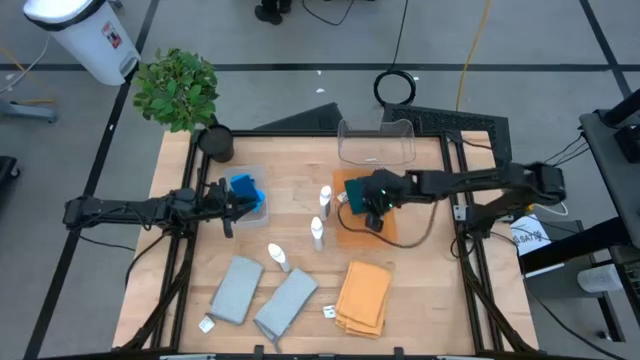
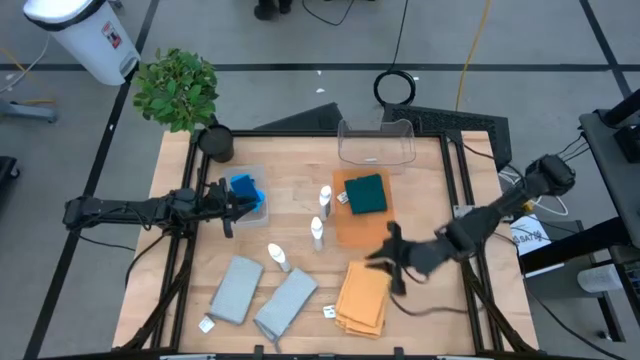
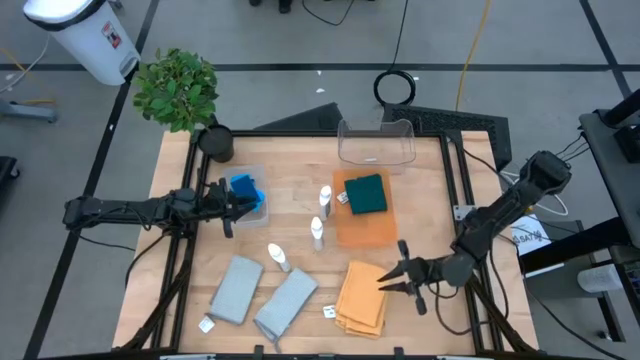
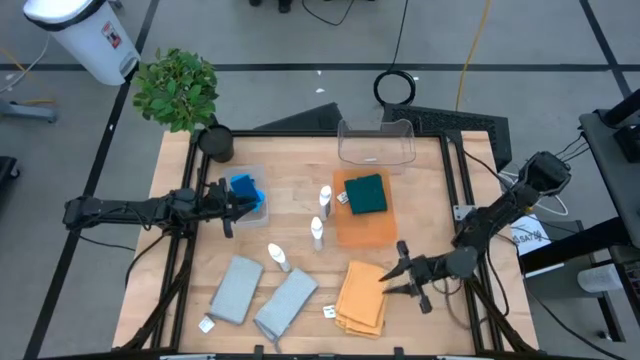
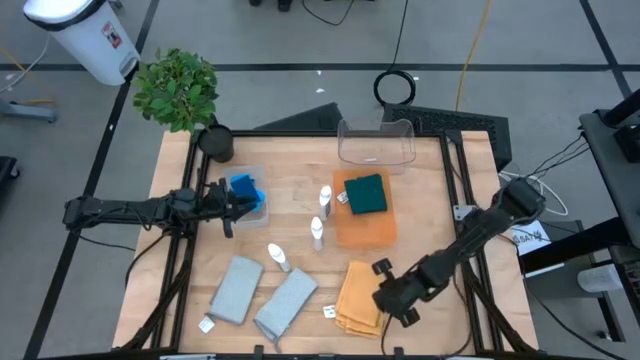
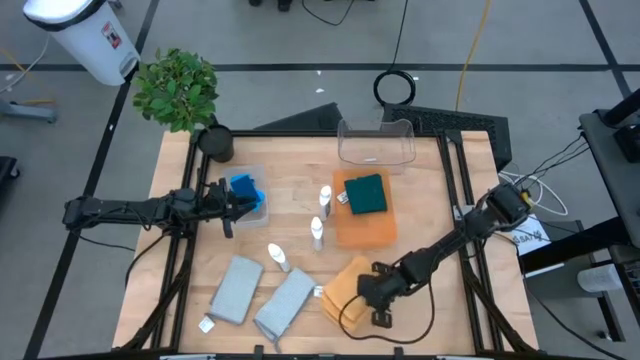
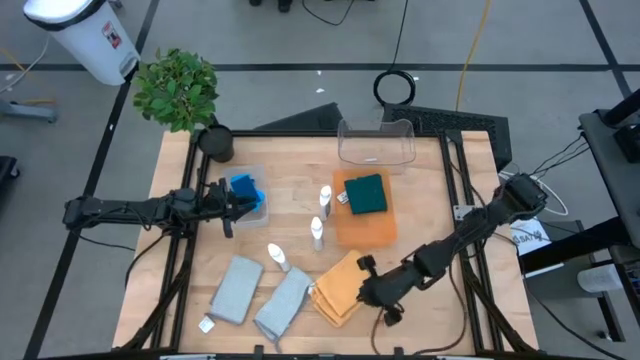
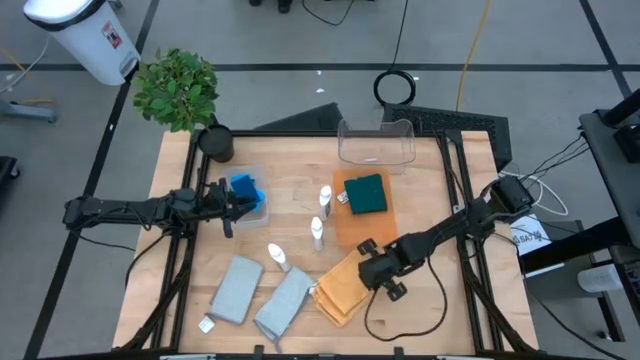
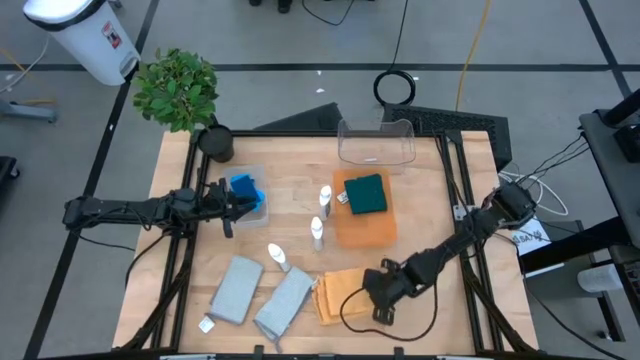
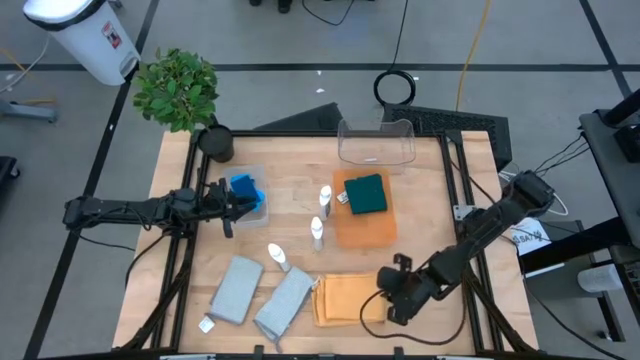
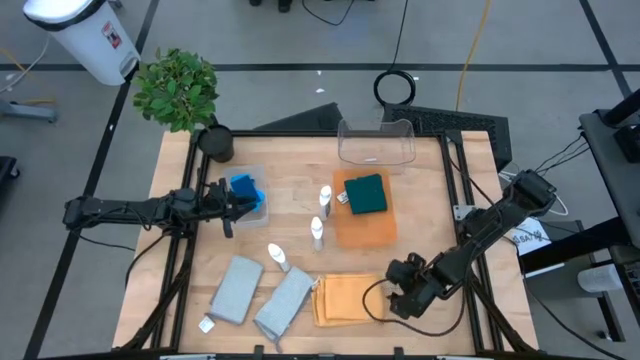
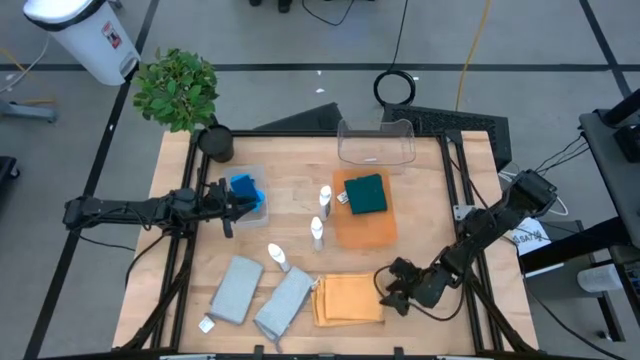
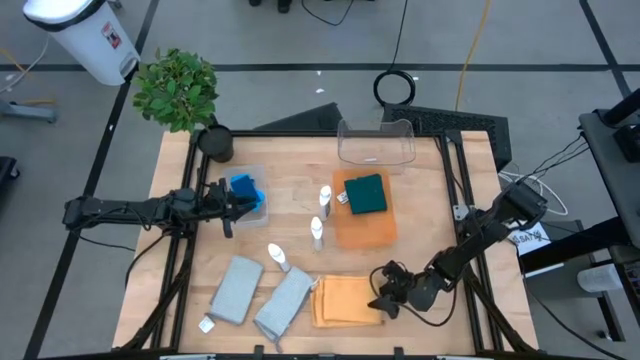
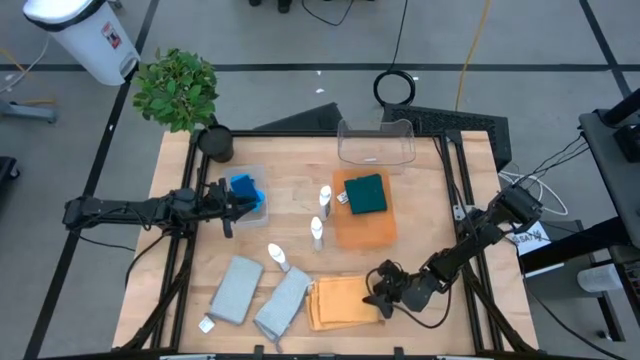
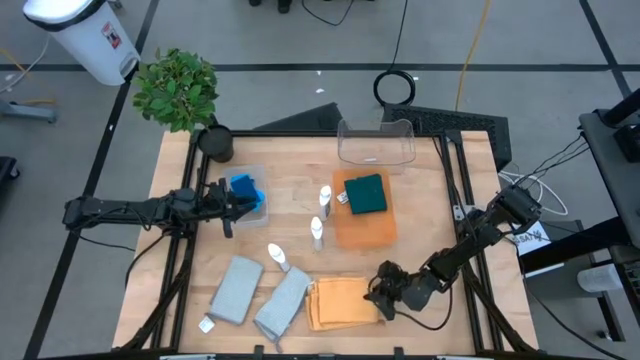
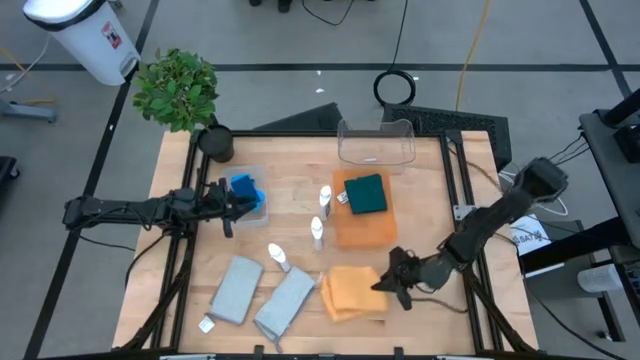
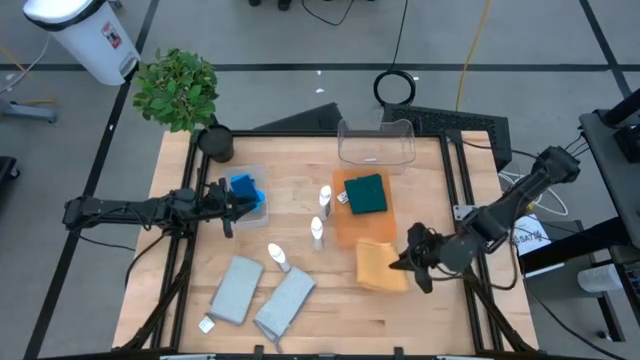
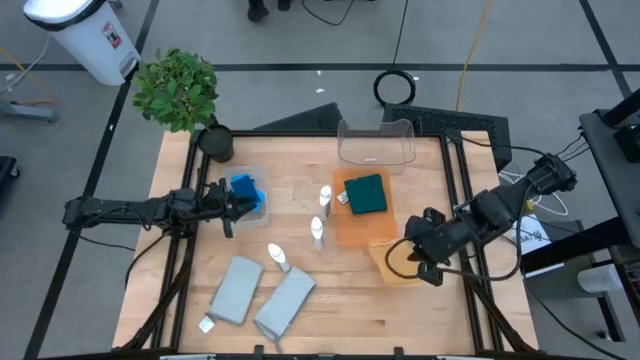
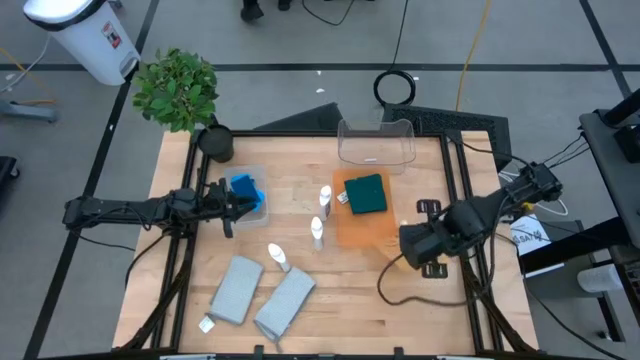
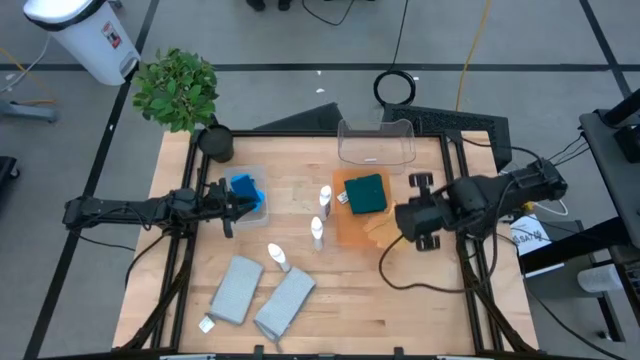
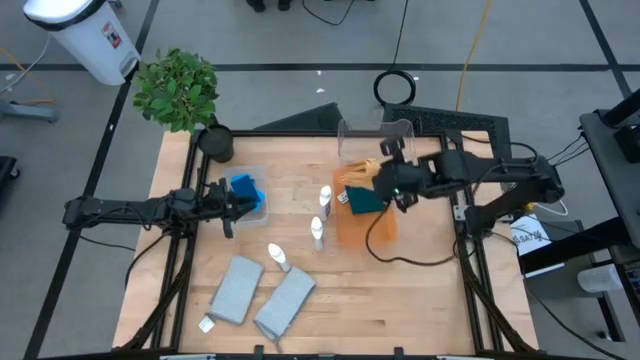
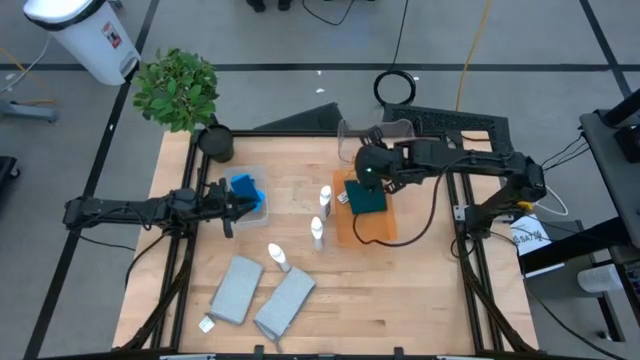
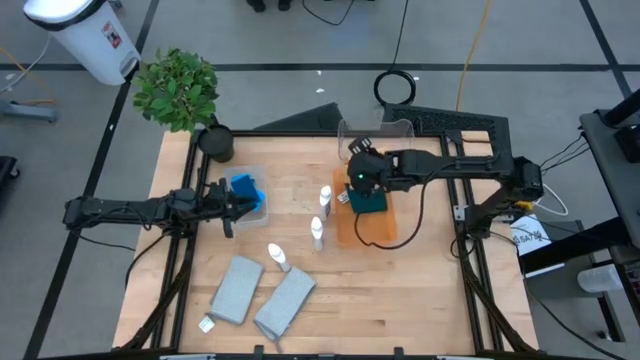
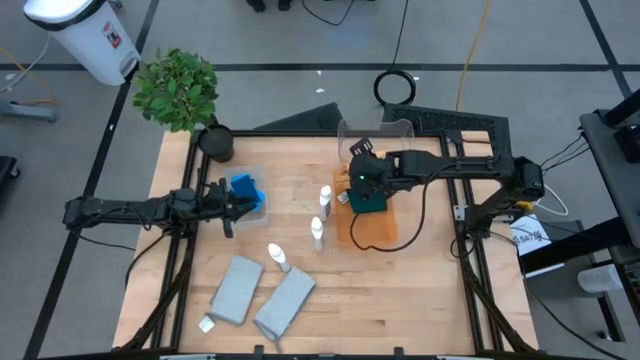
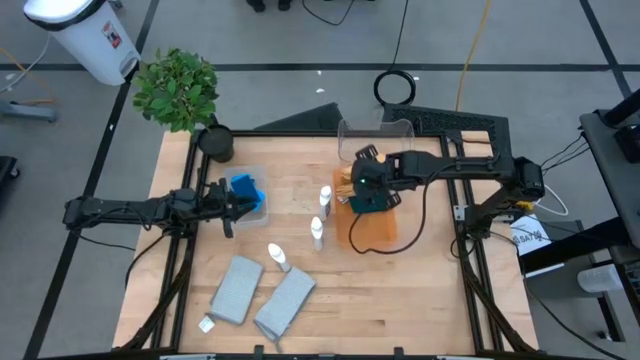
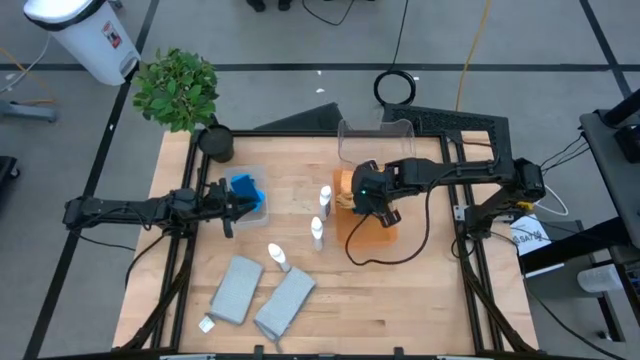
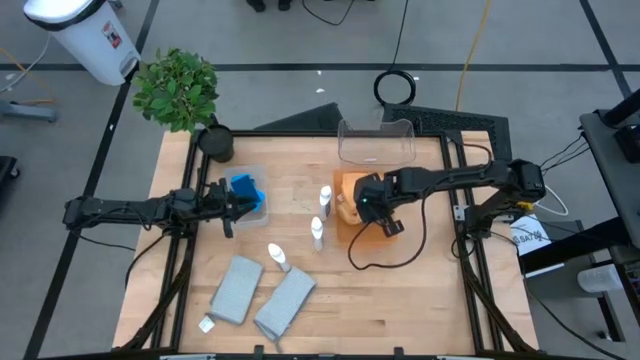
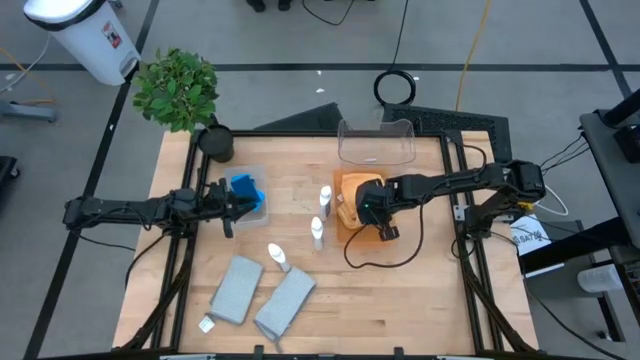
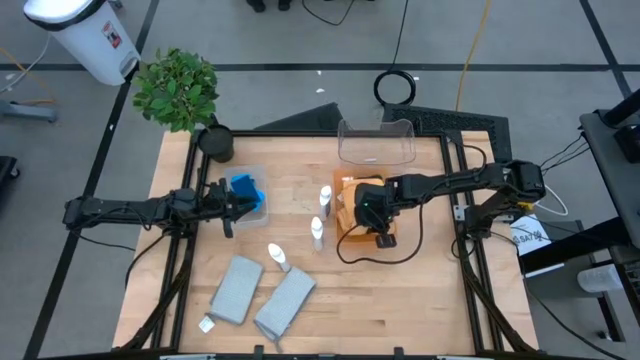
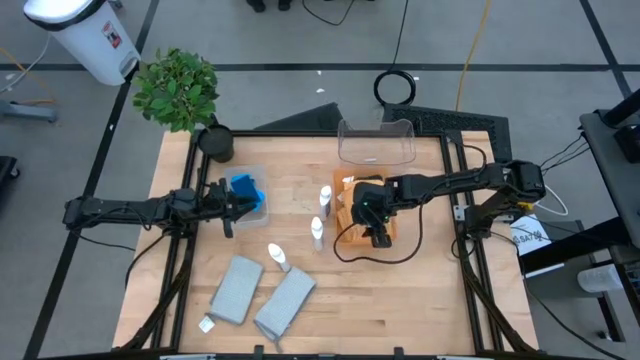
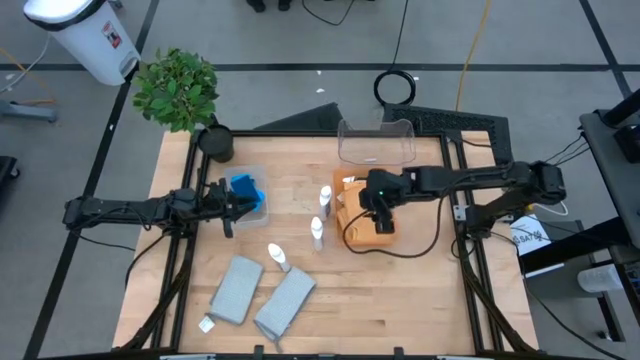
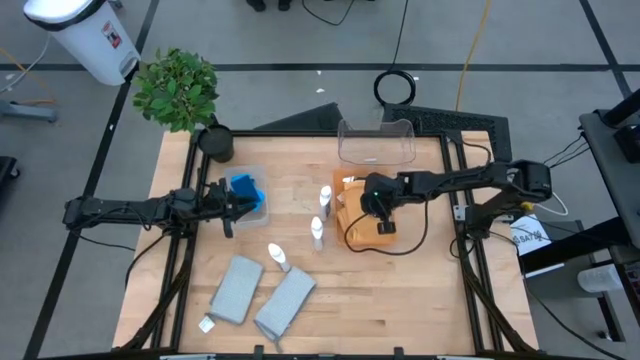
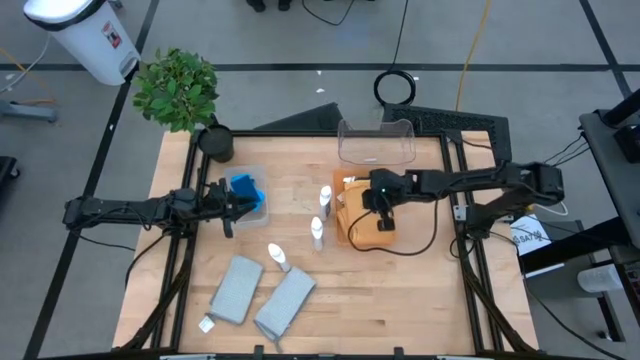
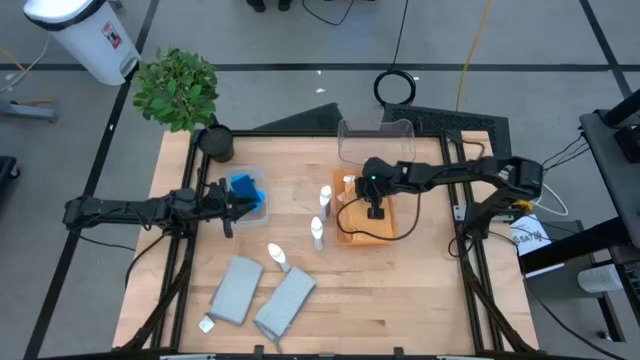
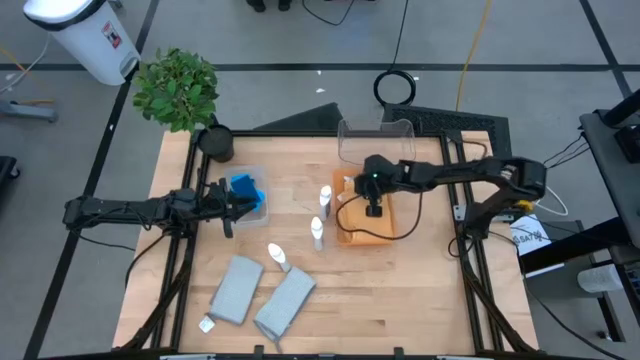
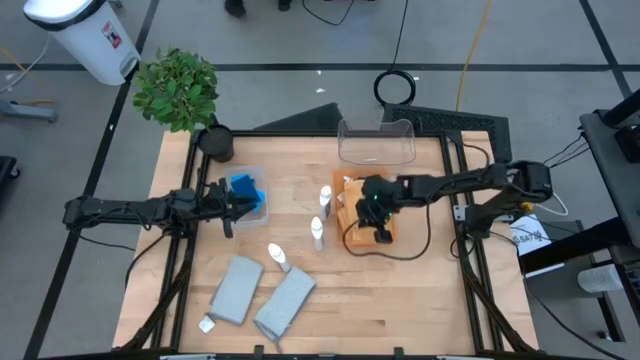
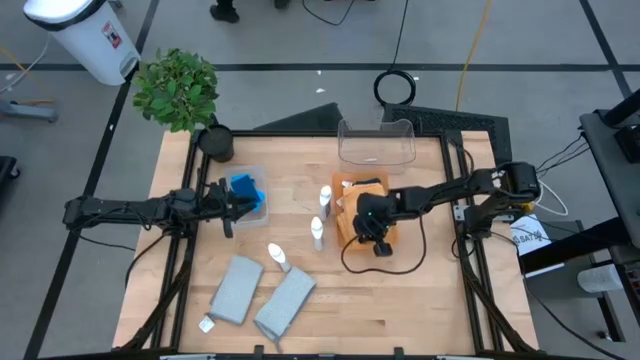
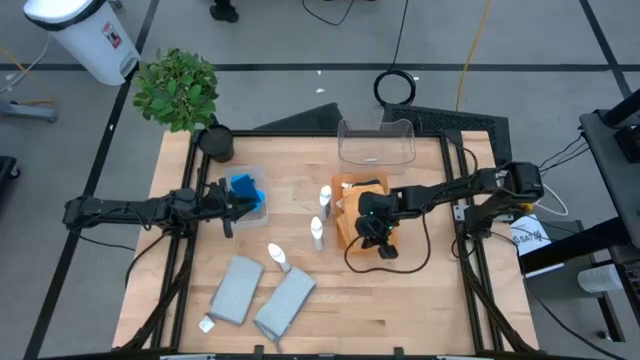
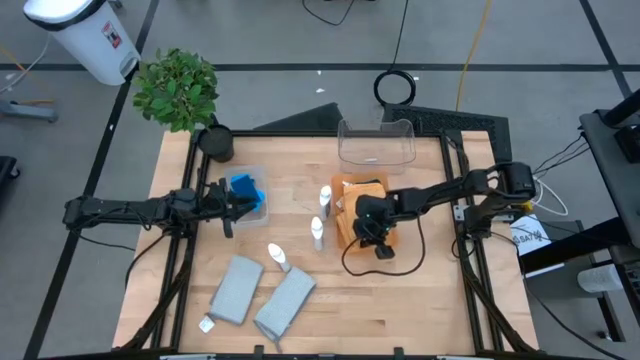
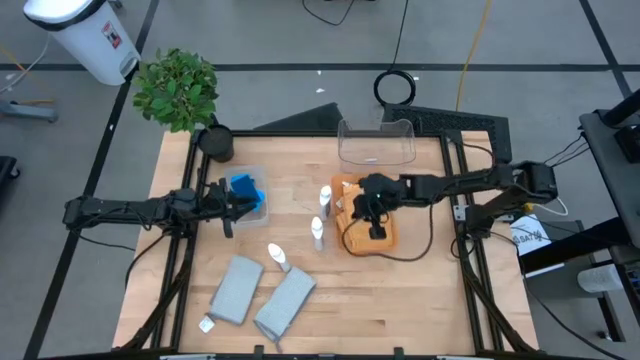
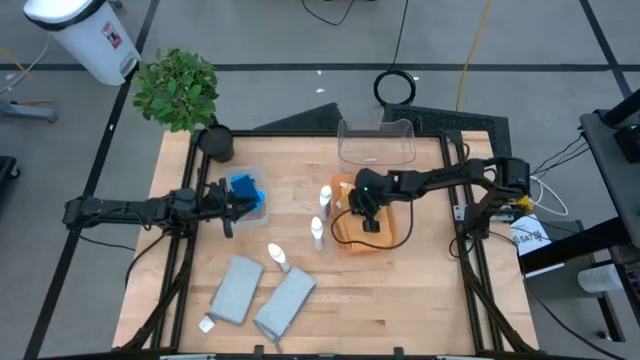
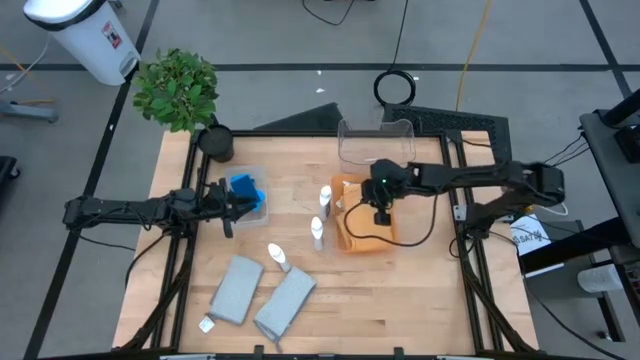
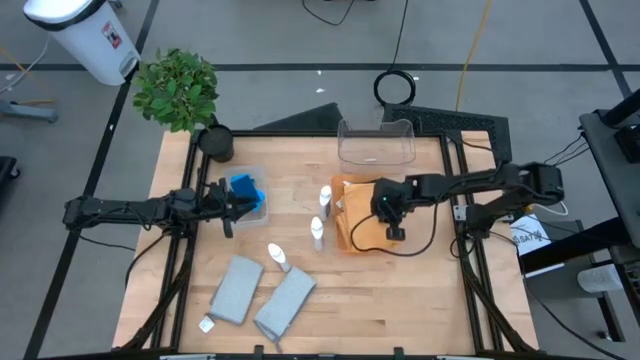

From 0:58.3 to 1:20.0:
Task: Pick & Place Kitchen Items
Put the orange microfiber cloth into the orange bin

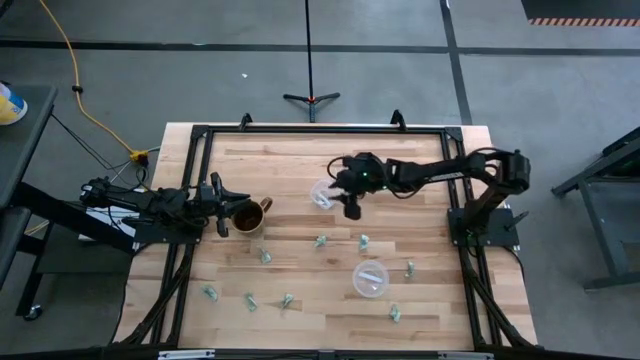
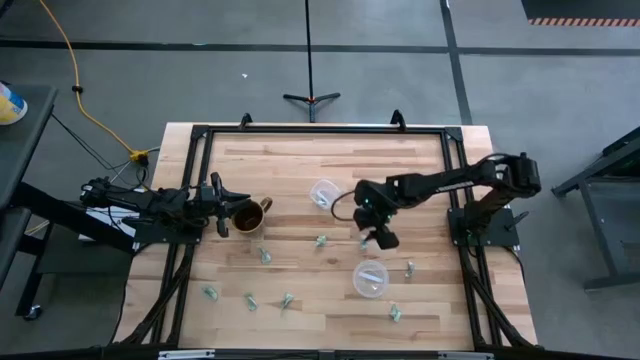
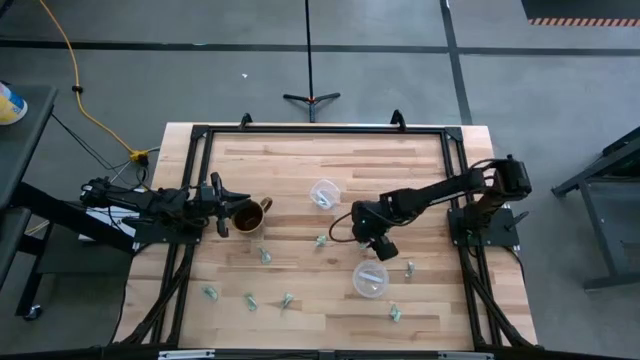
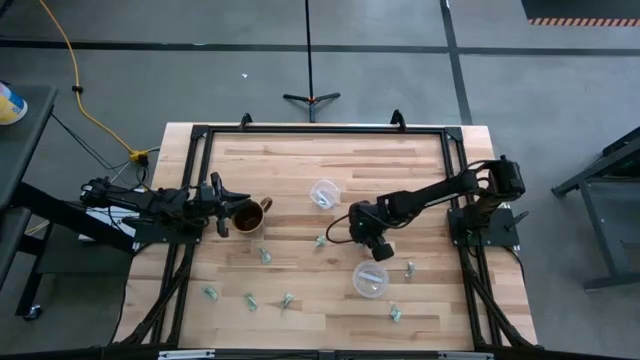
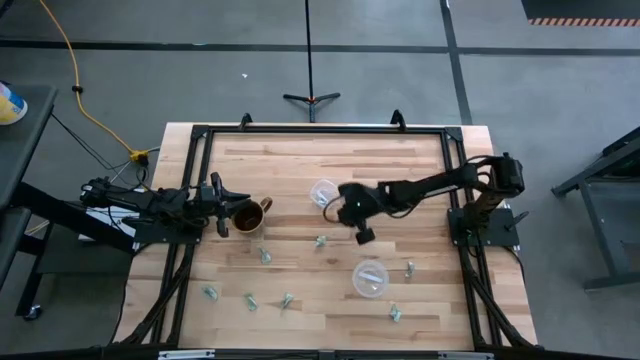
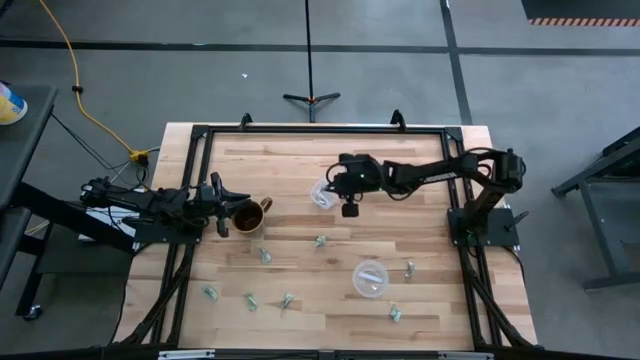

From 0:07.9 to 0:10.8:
Task: Pick and place Stevia / Truvia into bins
Put the stevia packet into the top transparent container
